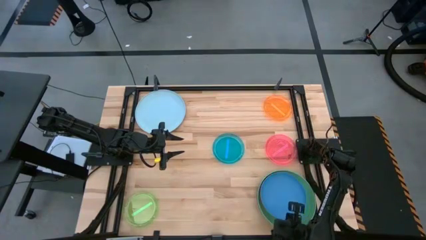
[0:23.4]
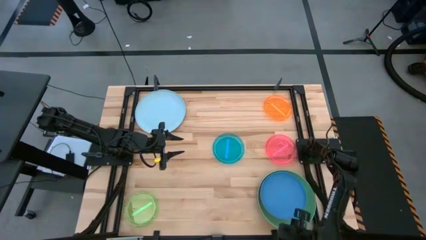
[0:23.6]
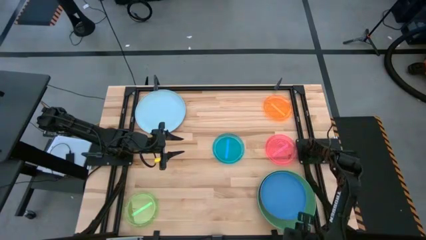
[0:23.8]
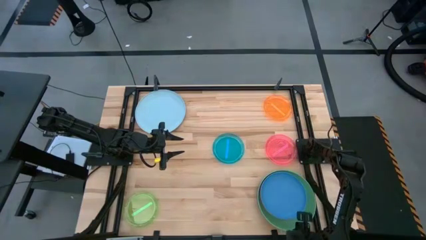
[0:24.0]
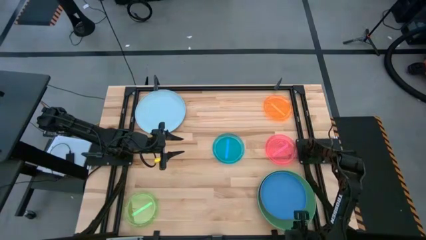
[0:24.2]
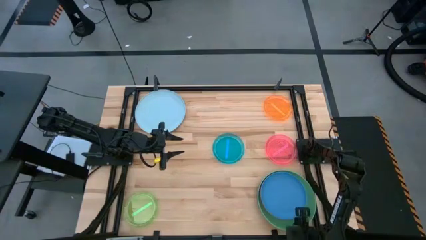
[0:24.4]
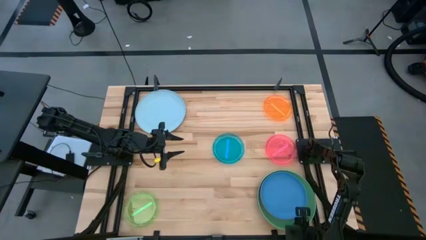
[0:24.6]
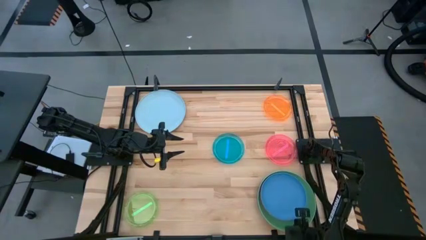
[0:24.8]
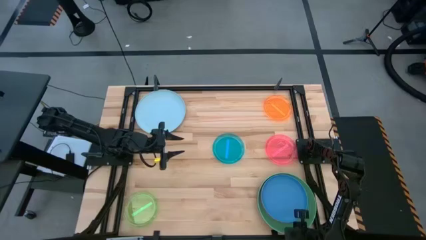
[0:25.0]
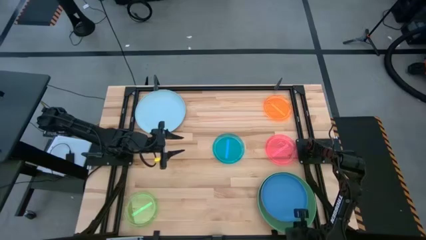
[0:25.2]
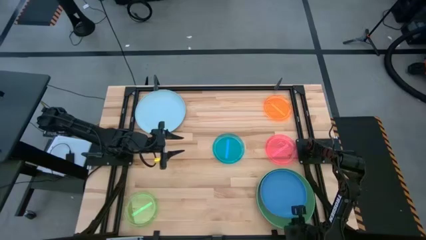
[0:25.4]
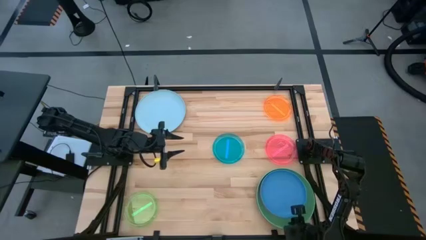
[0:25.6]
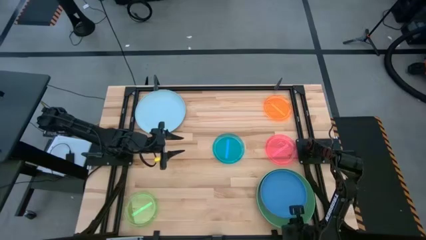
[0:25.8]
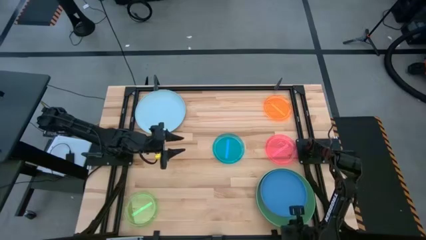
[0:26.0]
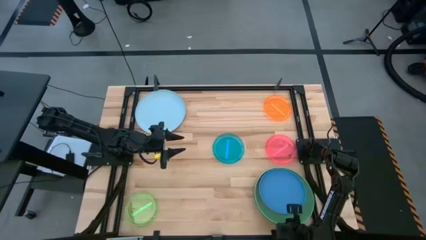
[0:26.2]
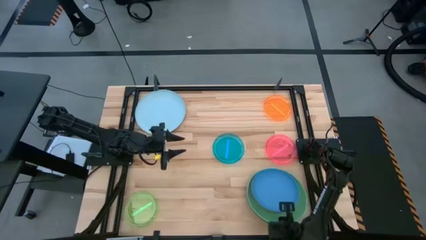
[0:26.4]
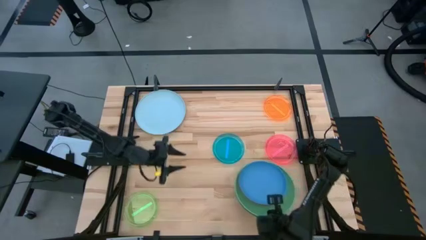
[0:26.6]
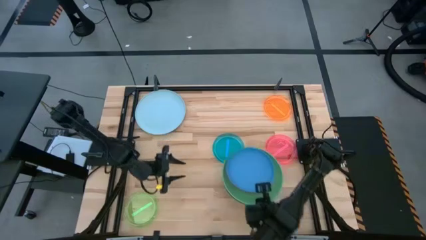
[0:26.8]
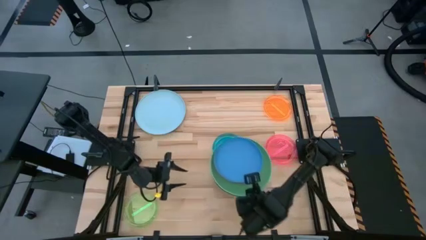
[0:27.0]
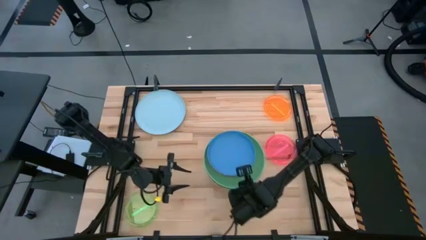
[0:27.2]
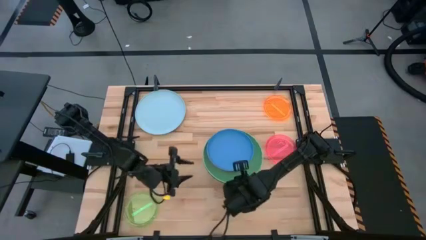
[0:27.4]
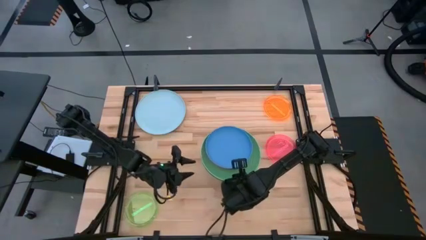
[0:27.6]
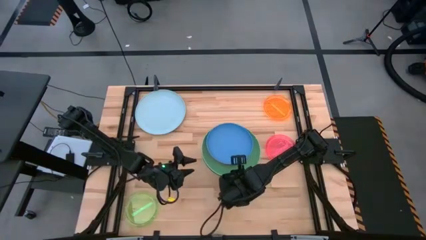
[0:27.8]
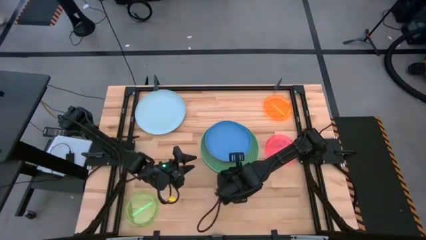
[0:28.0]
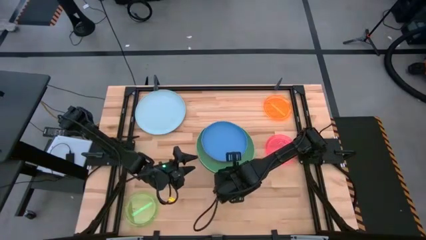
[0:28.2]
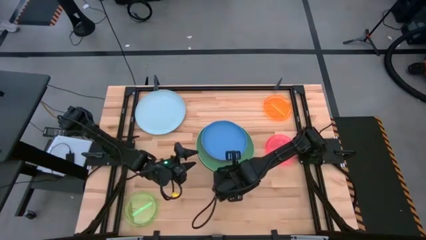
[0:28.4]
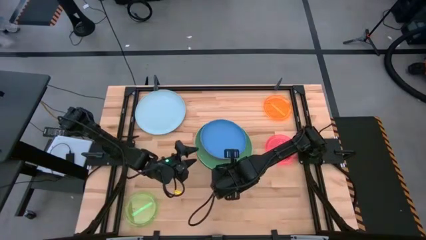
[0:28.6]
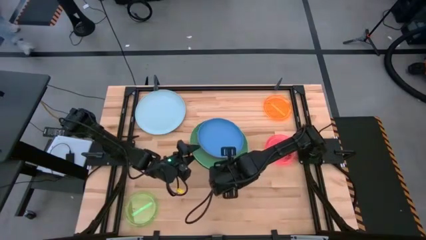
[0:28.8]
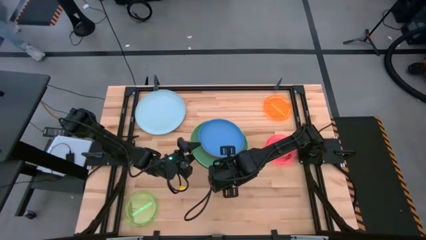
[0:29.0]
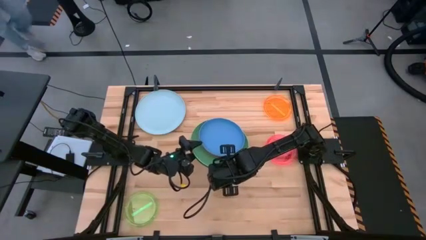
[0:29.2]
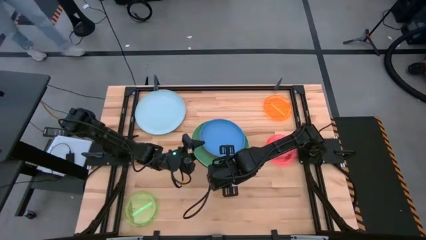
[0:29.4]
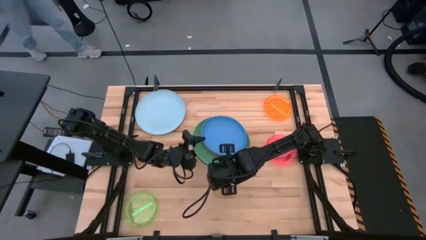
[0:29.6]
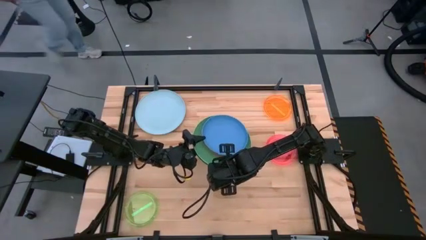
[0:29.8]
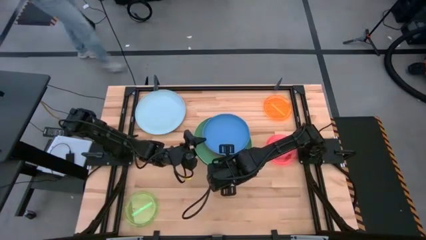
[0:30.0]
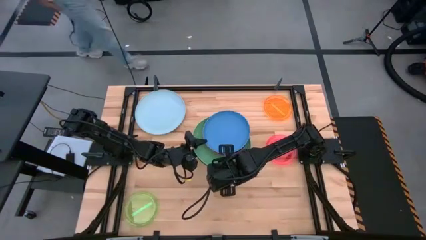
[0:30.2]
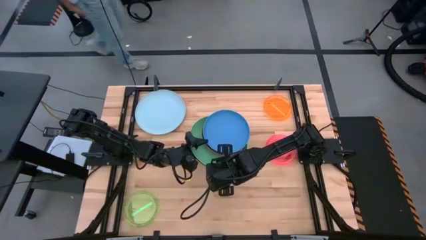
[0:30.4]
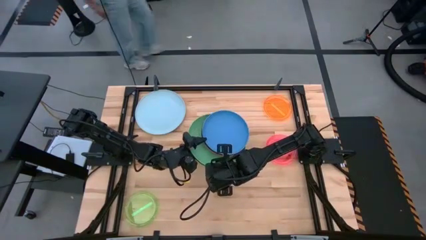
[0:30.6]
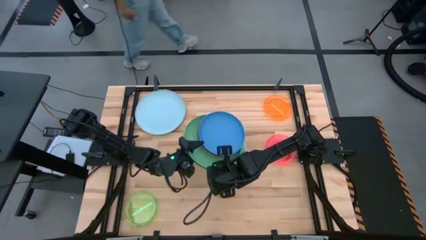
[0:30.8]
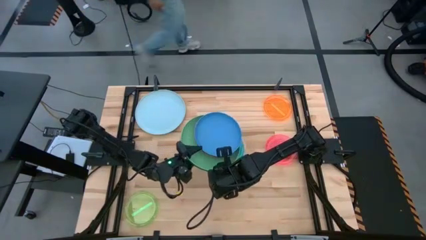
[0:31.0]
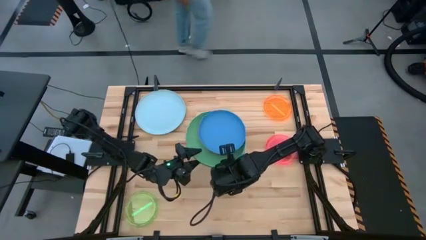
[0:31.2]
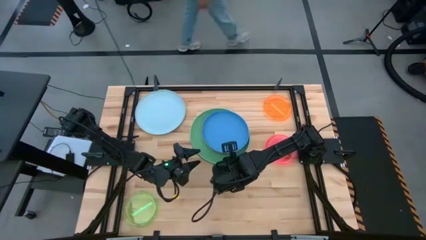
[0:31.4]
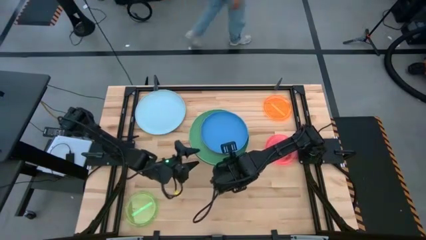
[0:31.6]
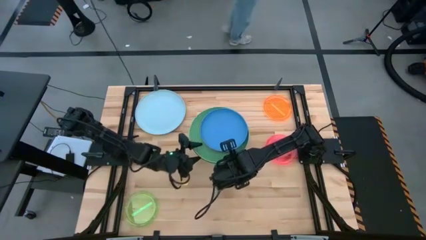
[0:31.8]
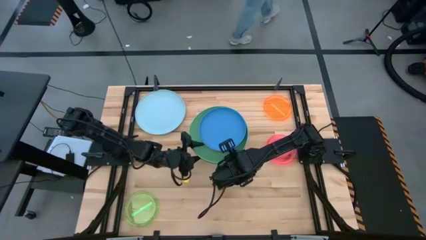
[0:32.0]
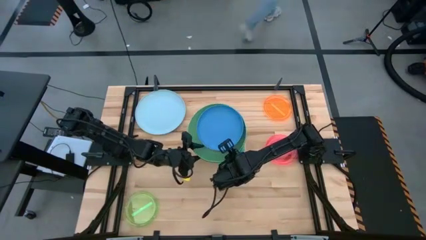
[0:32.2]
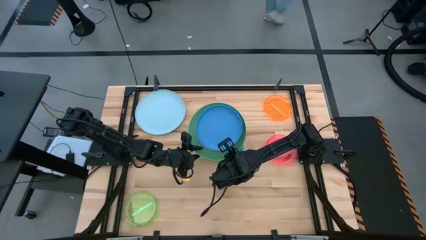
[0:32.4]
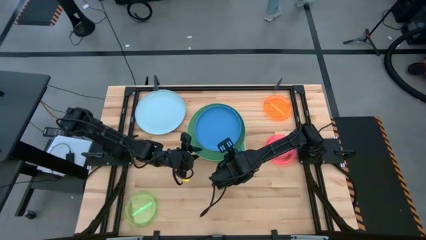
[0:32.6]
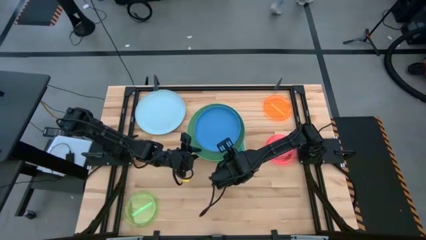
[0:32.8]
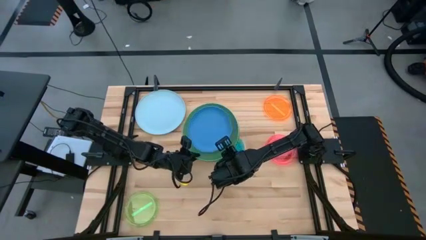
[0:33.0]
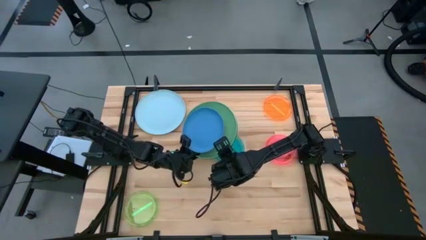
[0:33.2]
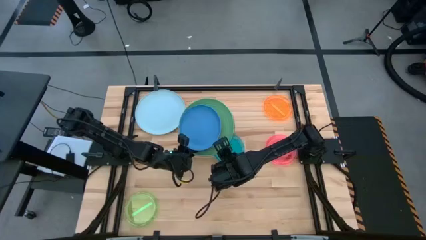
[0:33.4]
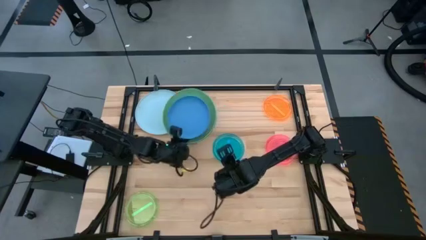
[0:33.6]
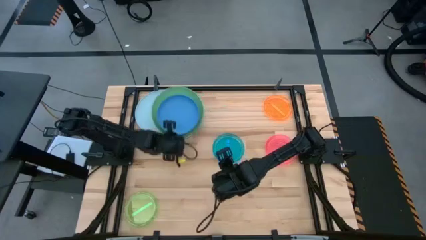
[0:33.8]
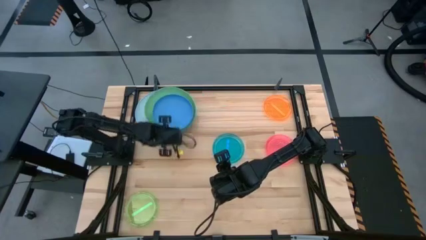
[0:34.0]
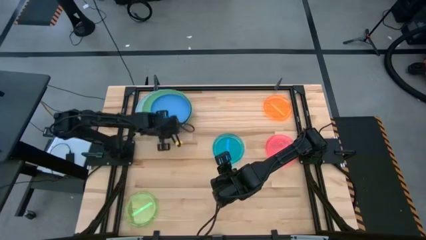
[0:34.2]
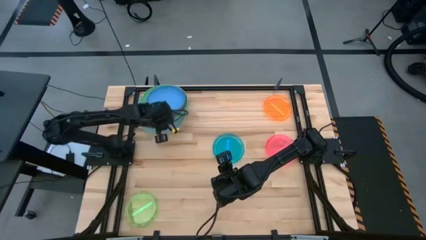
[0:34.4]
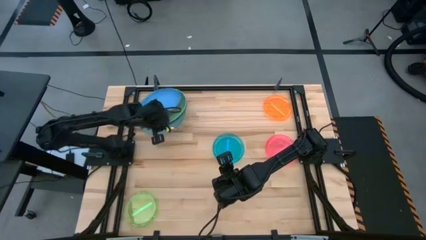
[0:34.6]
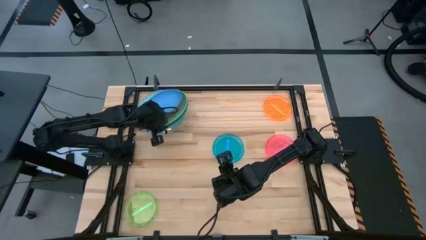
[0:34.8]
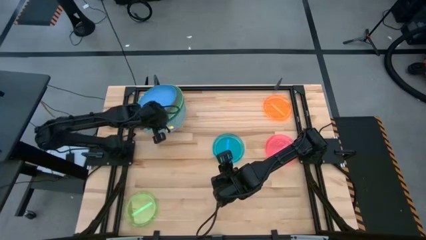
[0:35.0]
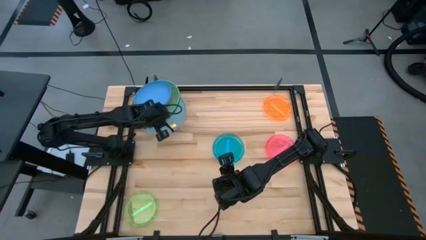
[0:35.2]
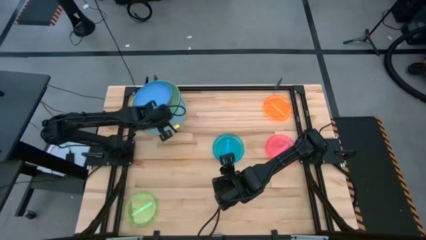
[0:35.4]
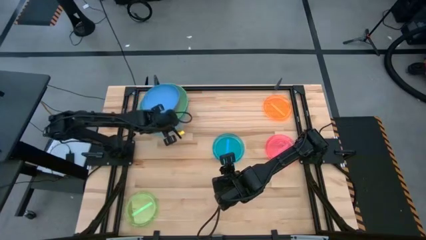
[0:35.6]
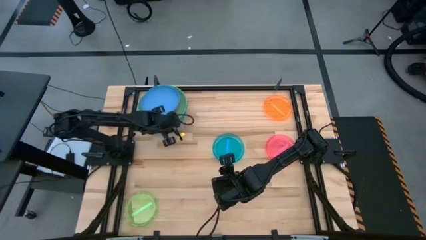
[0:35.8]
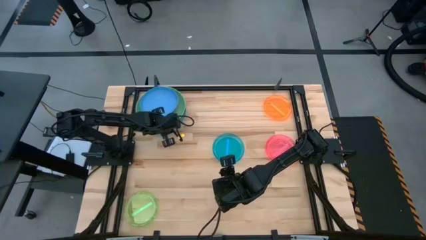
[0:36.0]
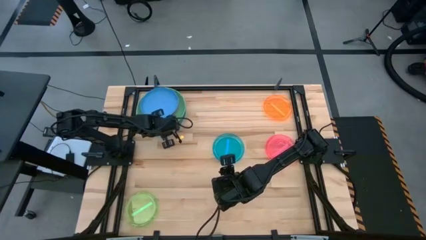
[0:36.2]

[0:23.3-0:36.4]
Task: Stack plastic plates
Stack the stacked plates on top of the blue plate

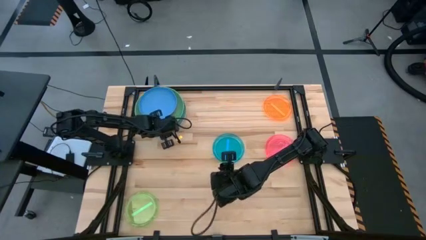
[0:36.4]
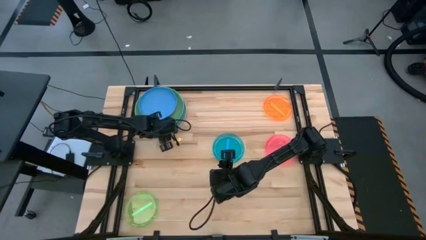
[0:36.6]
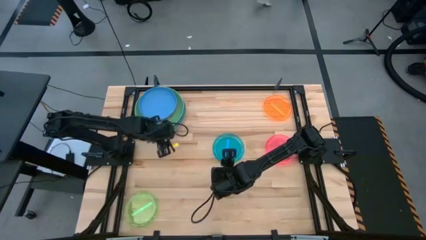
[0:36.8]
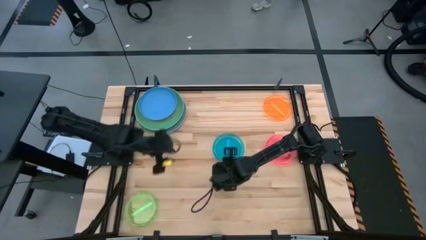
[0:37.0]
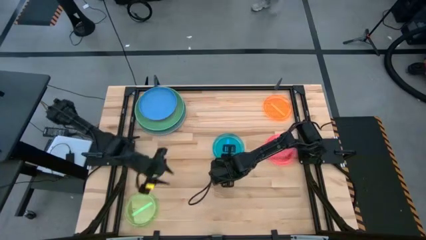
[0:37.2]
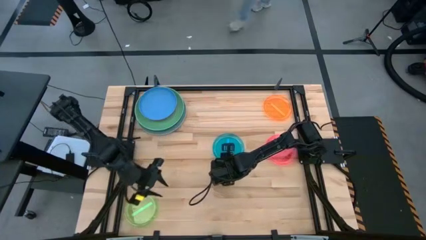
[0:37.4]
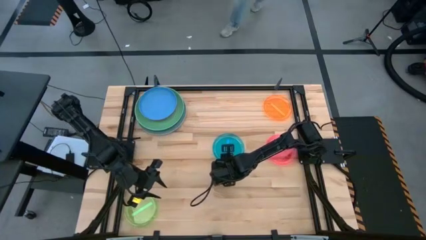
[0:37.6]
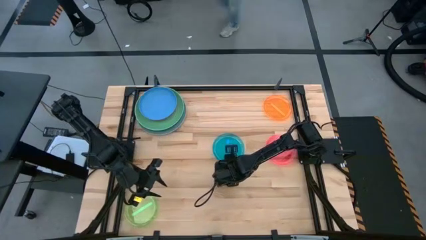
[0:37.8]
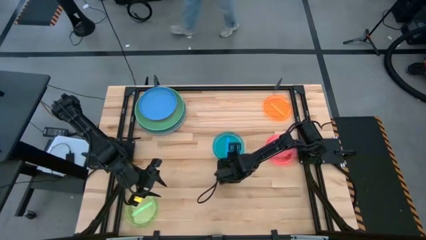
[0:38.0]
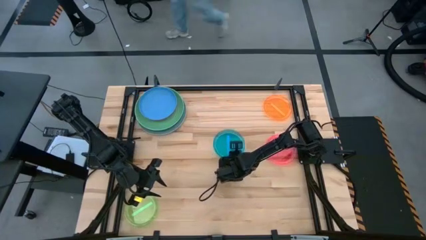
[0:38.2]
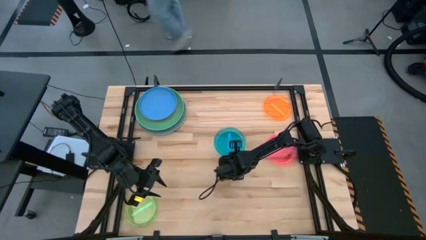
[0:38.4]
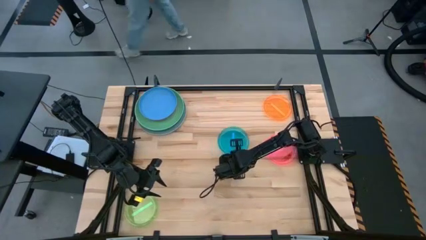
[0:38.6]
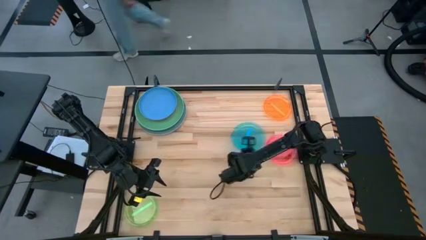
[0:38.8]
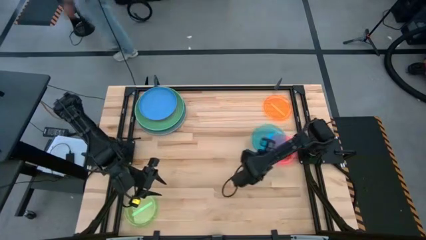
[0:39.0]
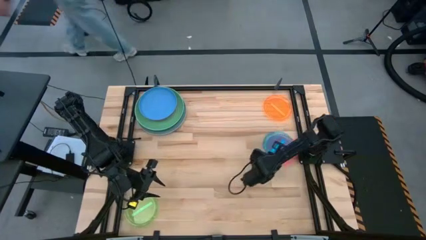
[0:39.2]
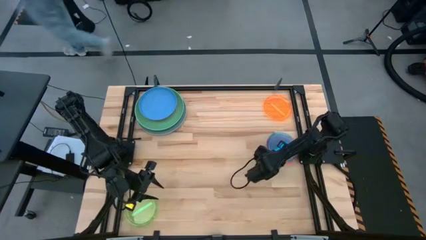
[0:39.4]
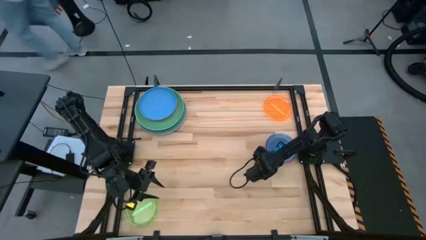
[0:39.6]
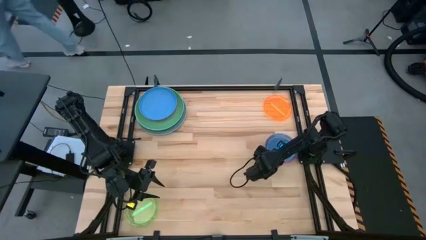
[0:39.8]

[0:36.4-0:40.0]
Stack the light blue plate on top of the pink plate

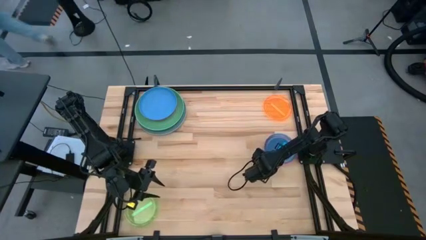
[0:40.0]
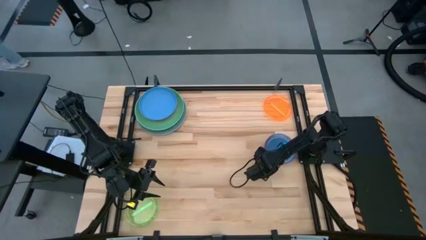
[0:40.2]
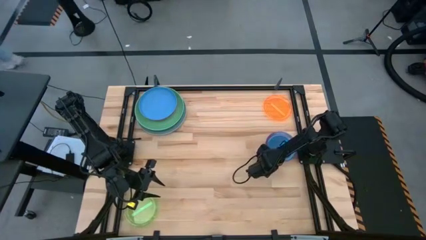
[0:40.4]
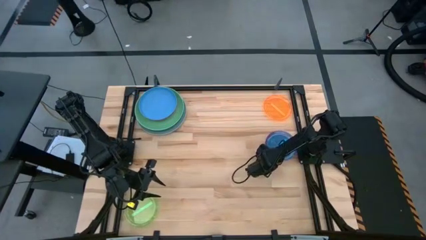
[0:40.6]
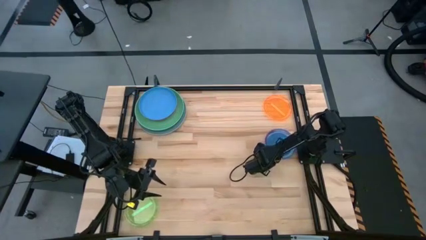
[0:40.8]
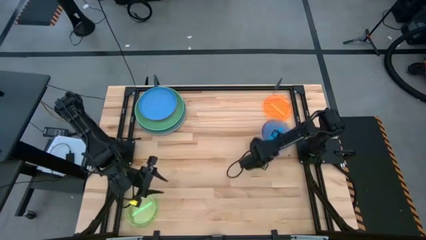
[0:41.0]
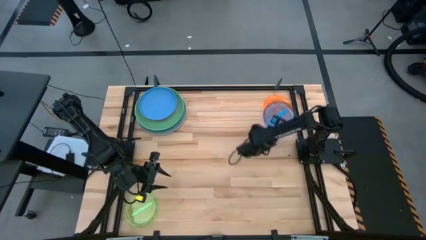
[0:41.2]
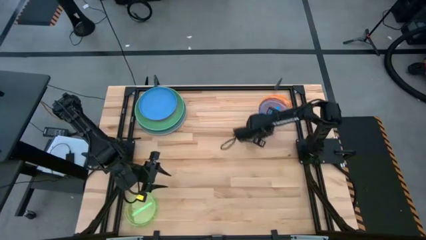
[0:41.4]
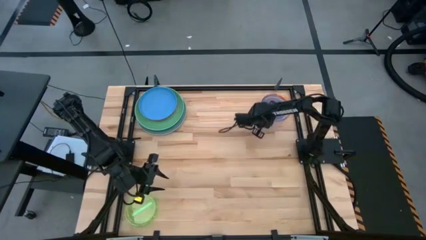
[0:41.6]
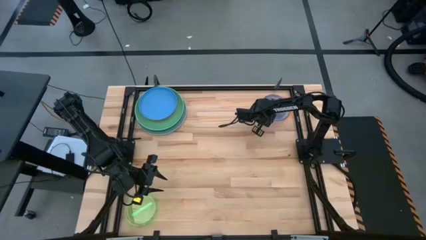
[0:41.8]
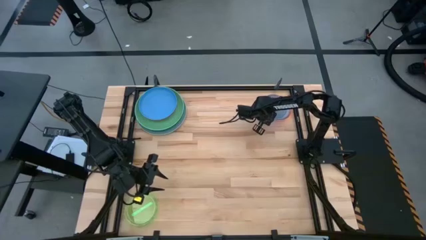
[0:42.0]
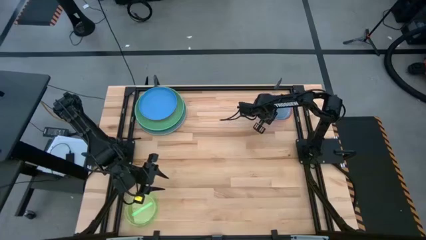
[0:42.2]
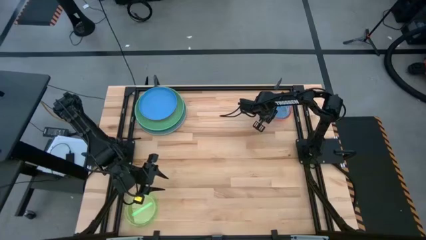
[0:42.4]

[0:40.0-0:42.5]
Stack the bottom stacked plates on top of the light orange plate
